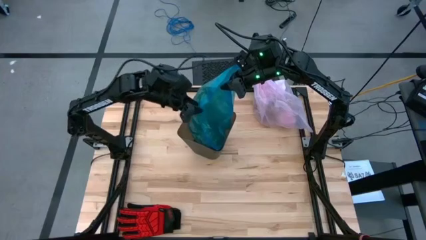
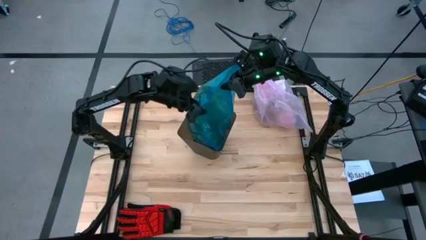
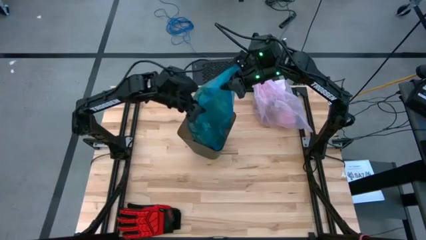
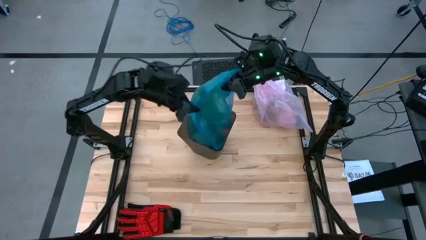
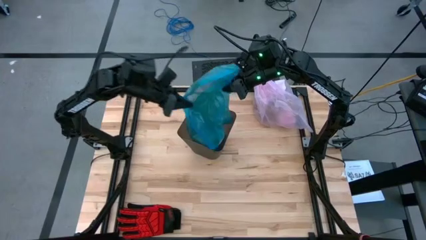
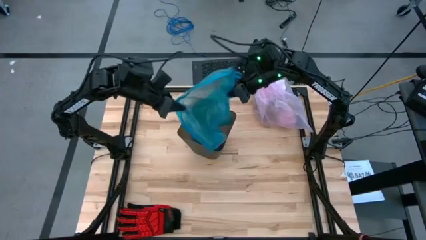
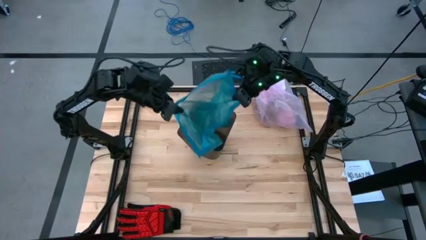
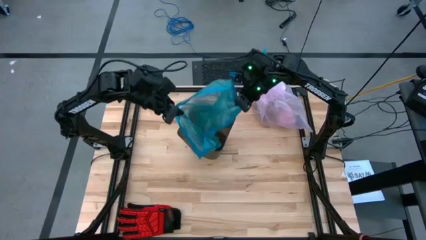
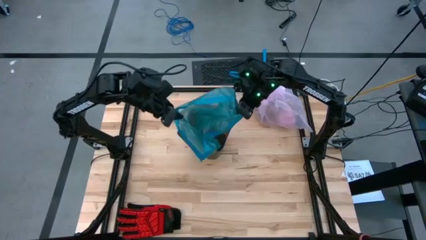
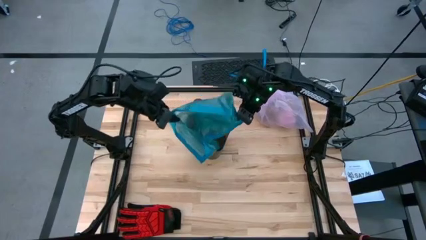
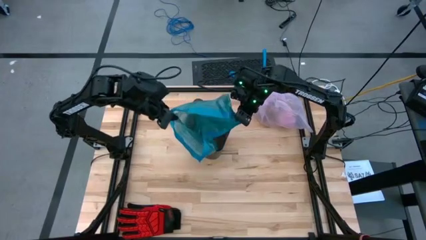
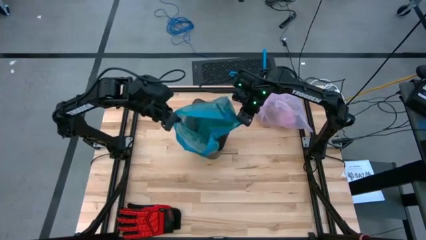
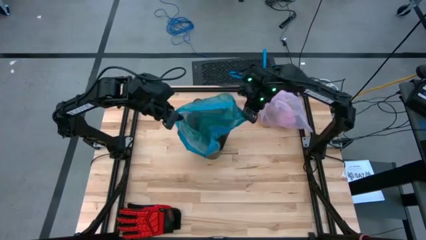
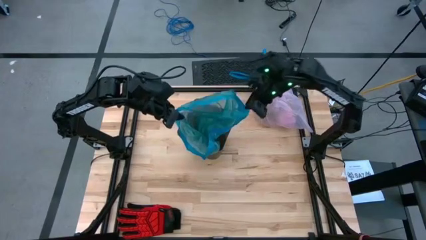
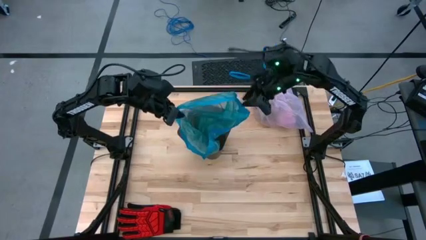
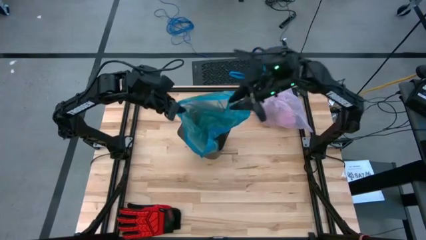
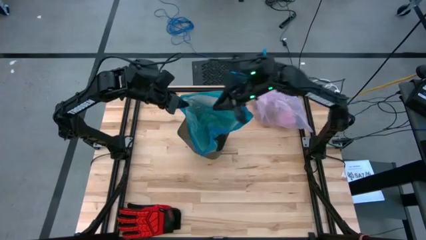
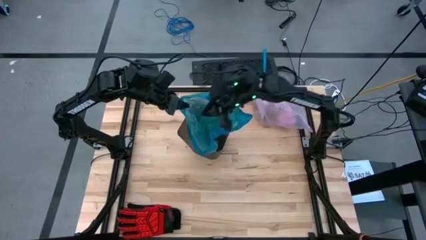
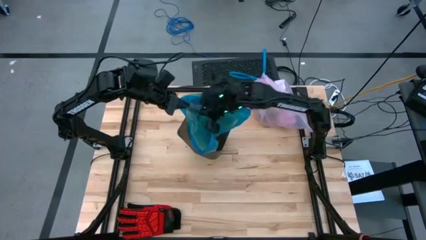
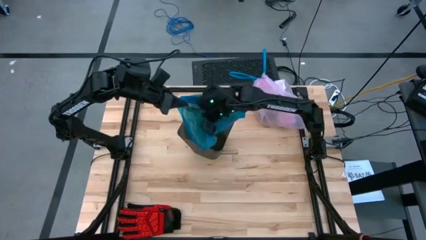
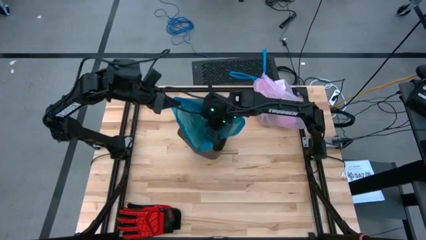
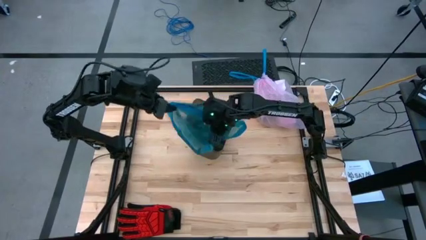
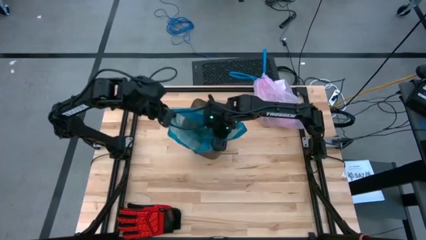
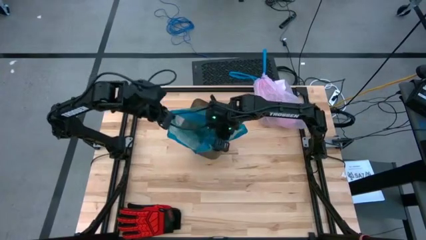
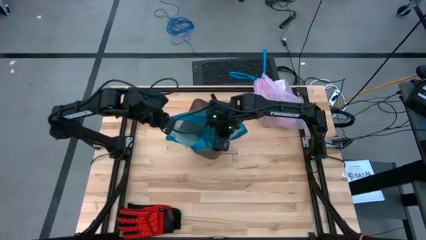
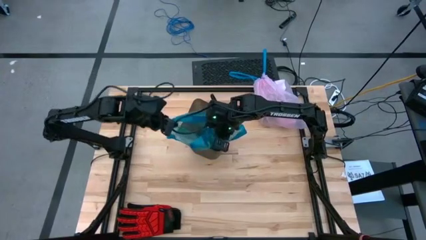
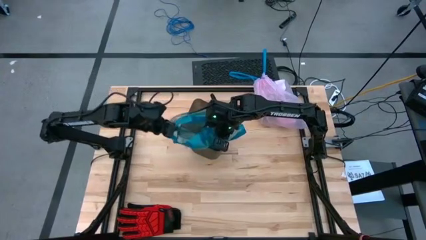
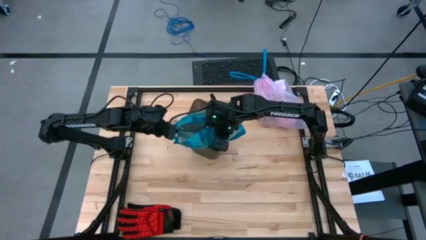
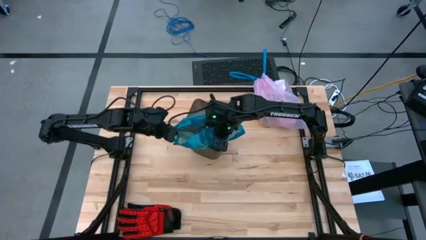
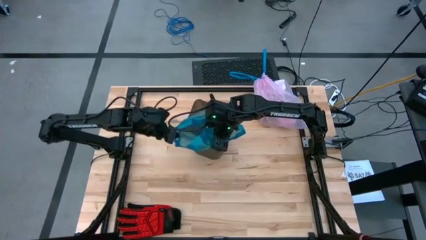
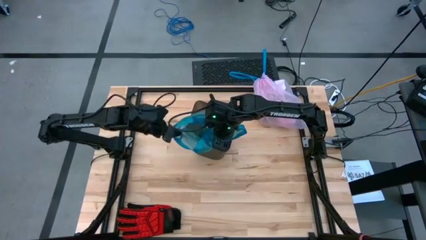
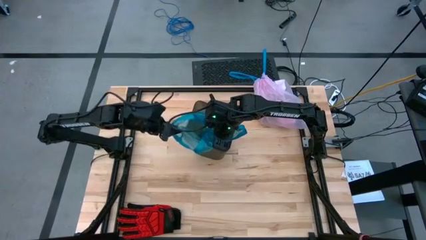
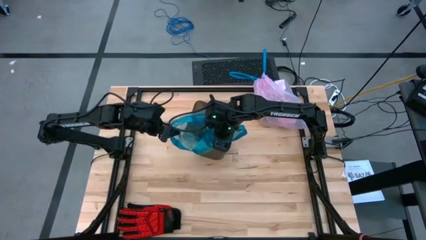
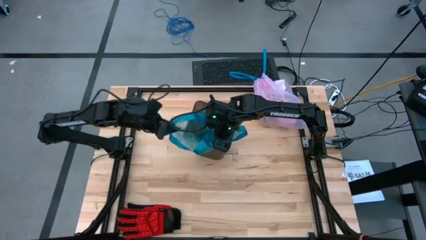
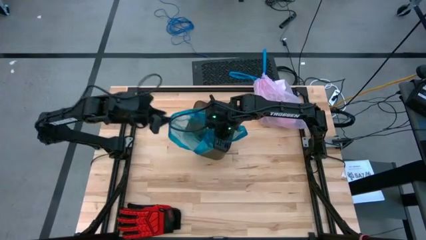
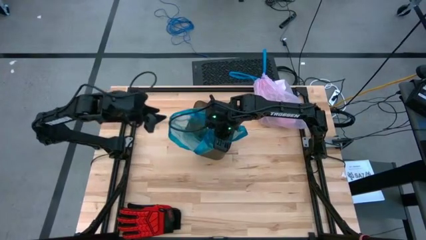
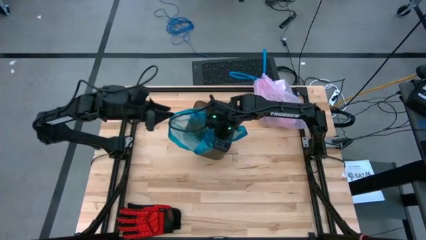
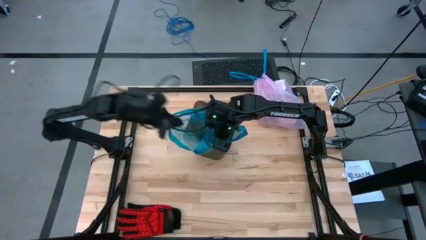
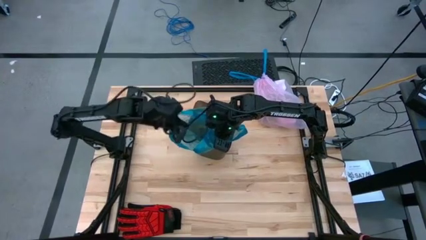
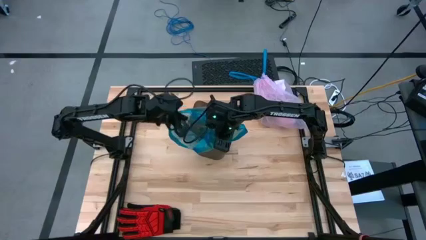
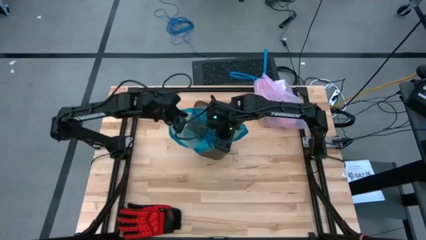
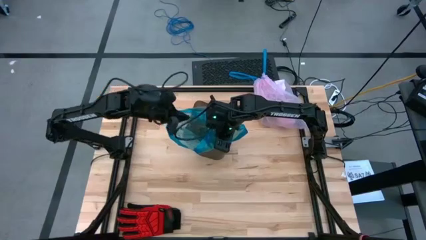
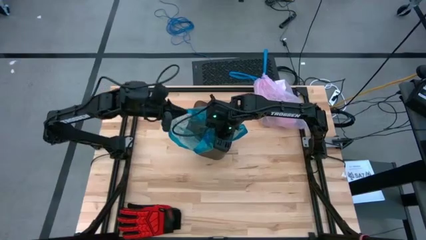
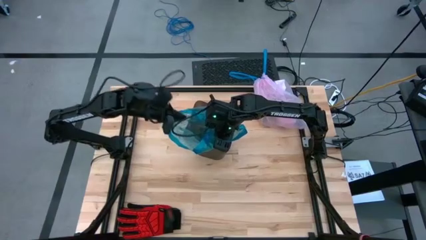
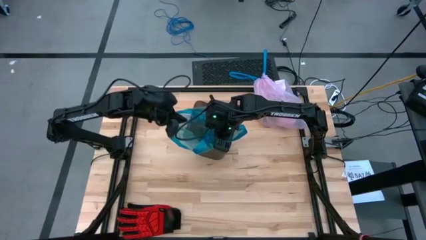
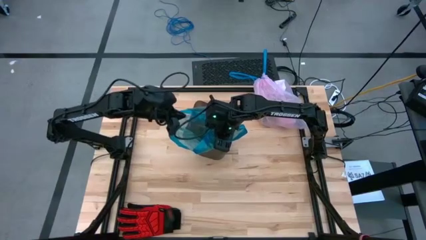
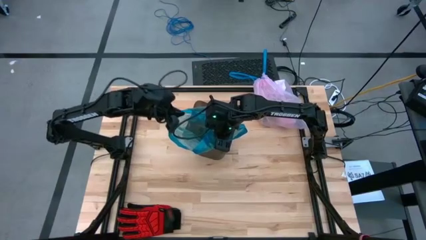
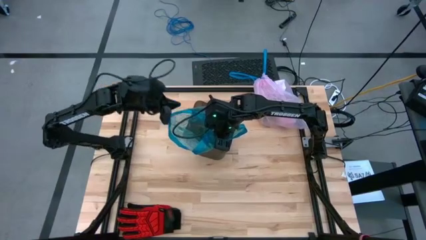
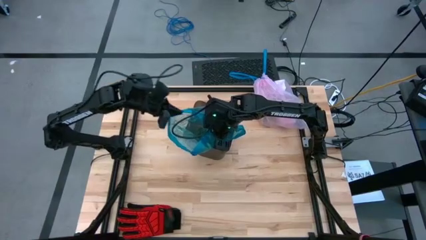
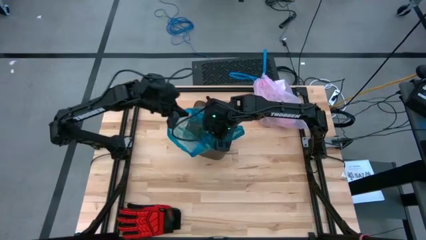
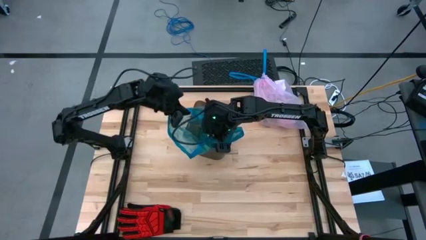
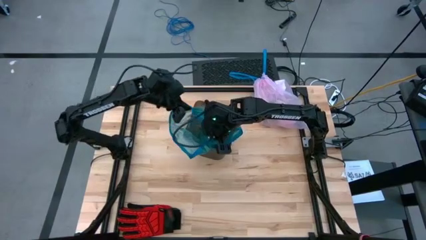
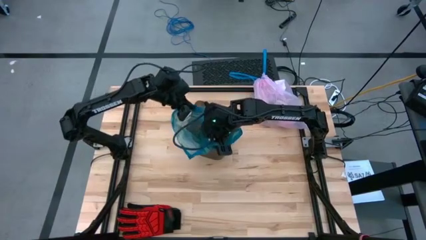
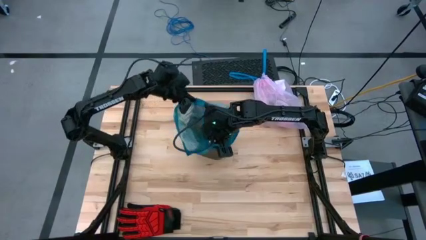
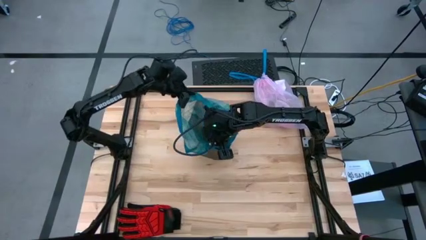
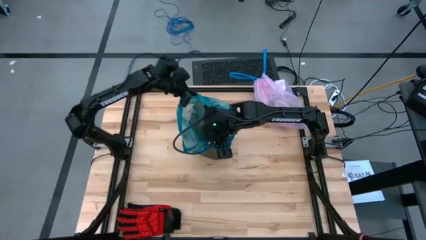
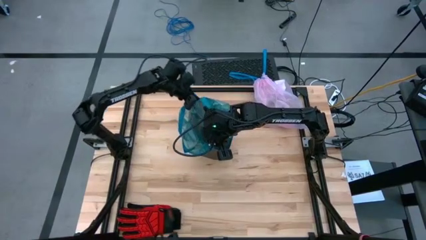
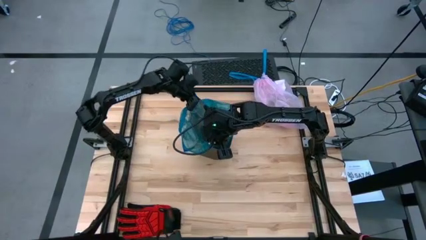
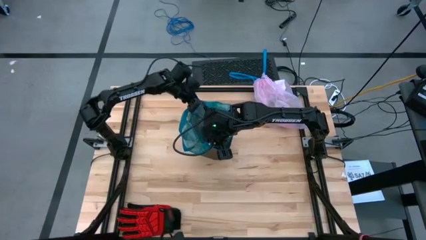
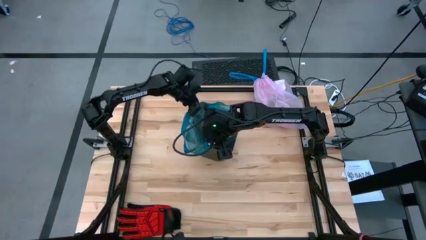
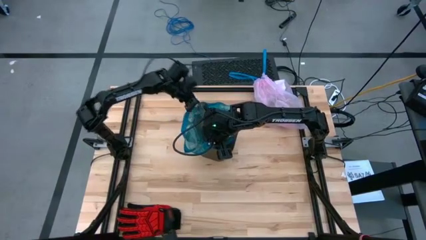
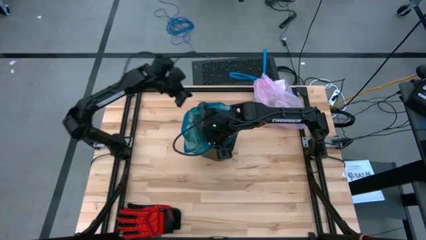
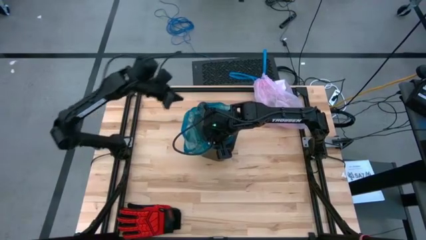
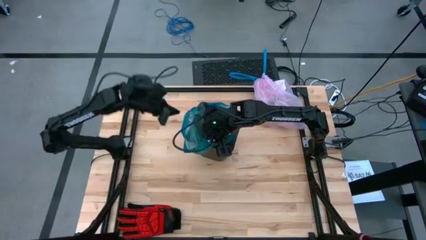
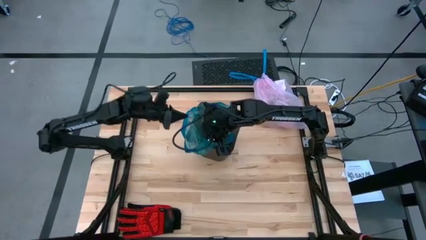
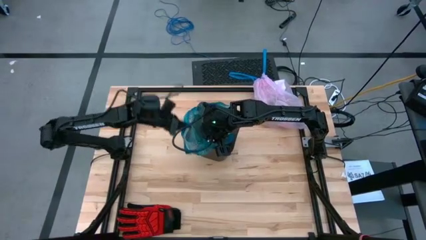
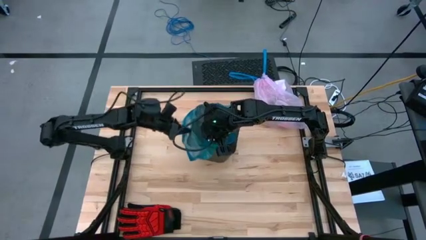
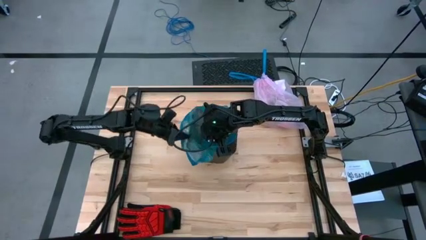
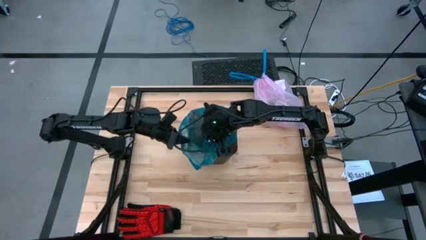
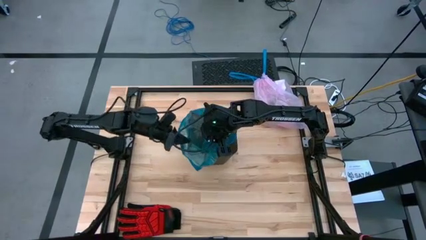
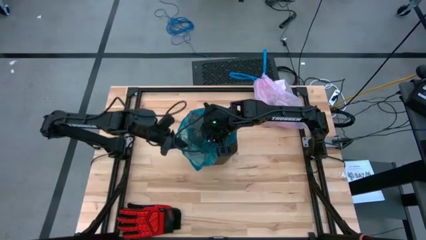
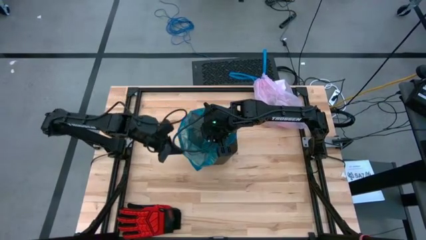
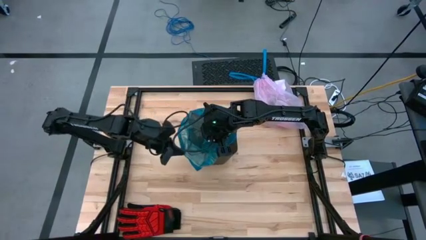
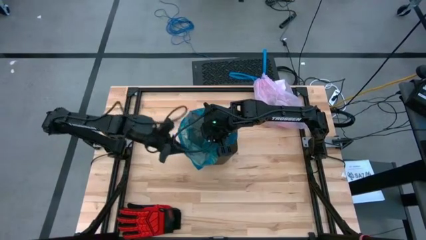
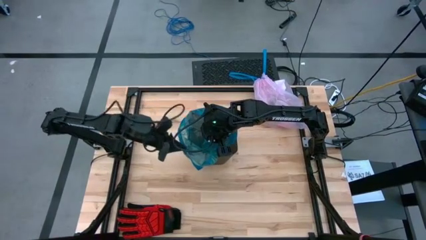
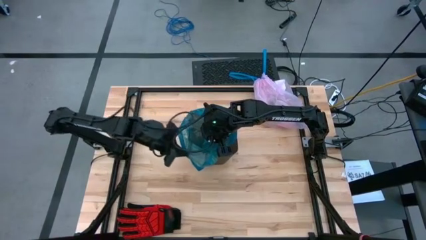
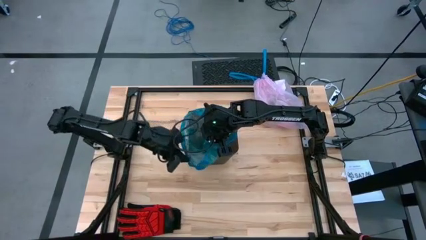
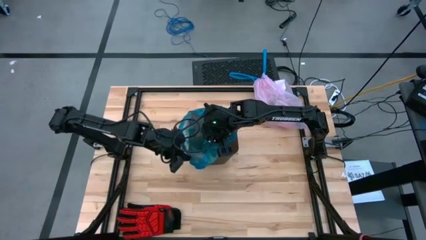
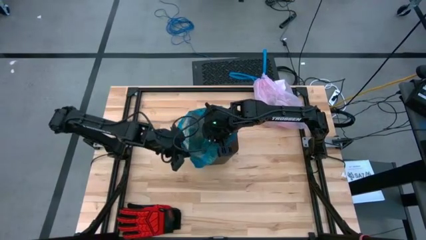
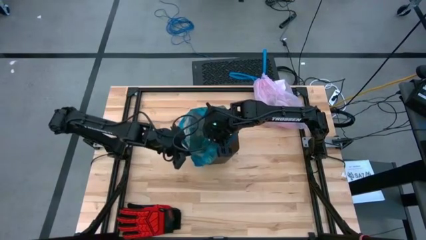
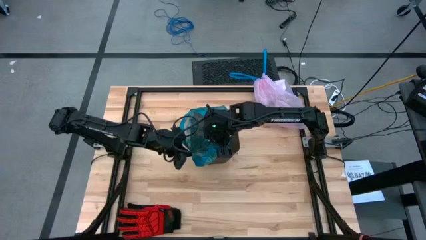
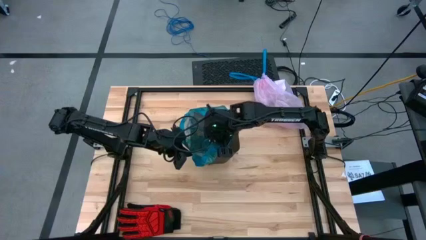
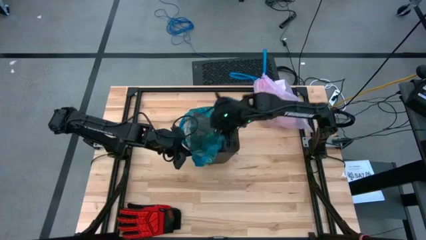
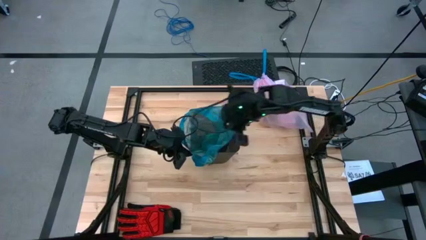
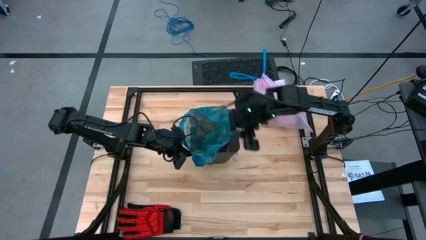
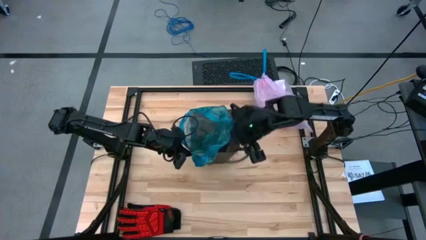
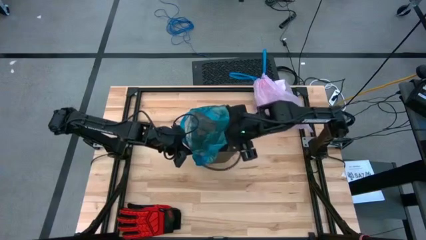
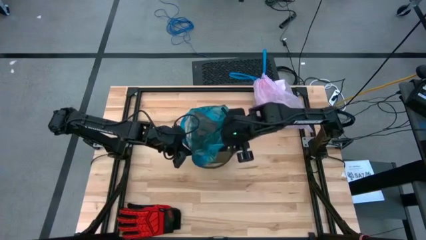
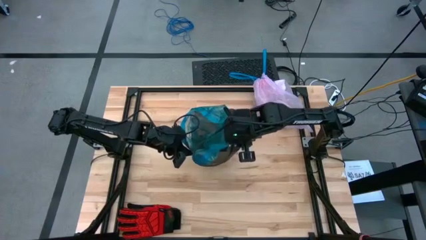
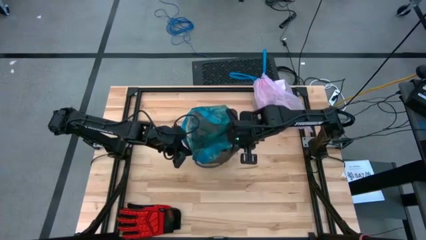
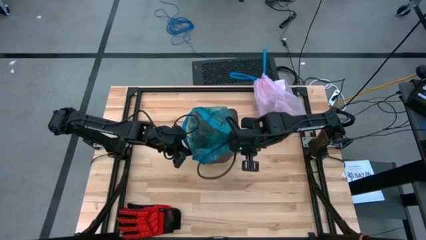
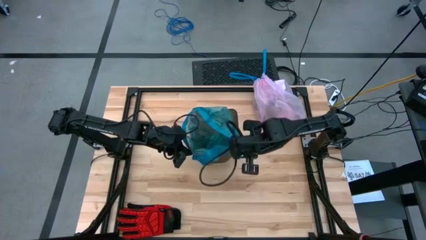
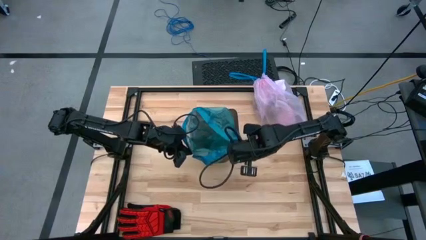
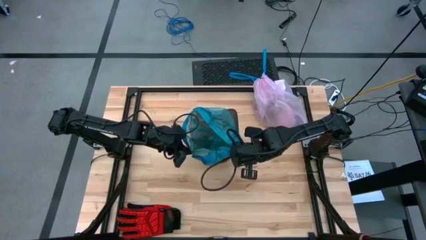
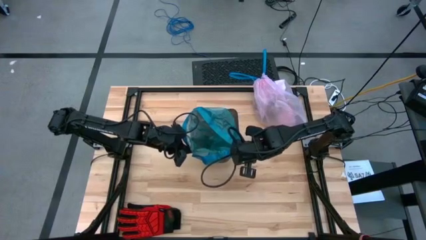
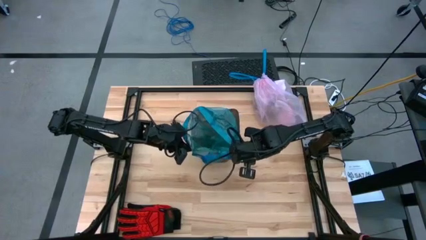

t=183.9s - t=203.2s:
Task: place trash/remove bag and relplace
Insert the blue trash bag into the black trash bin
